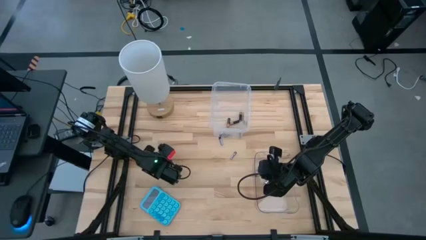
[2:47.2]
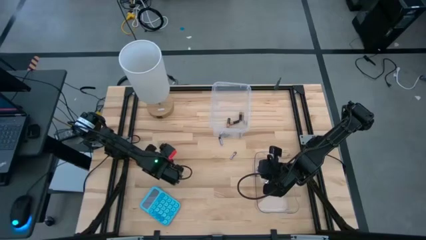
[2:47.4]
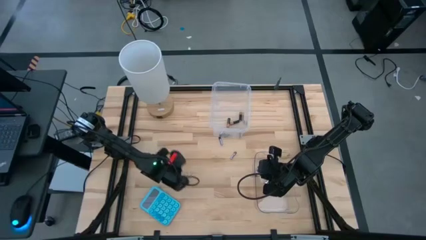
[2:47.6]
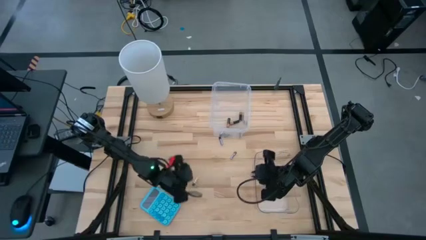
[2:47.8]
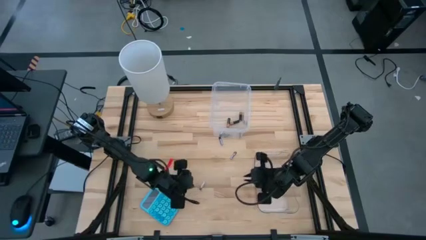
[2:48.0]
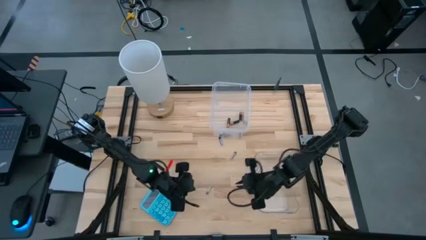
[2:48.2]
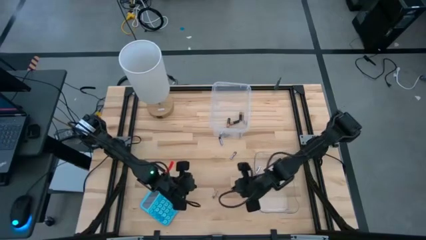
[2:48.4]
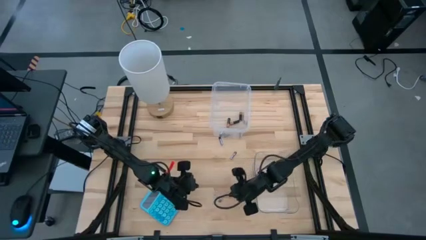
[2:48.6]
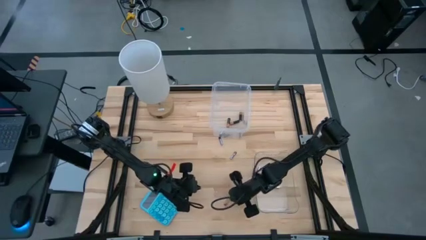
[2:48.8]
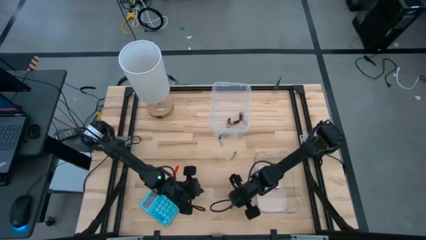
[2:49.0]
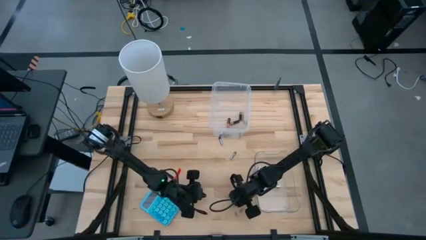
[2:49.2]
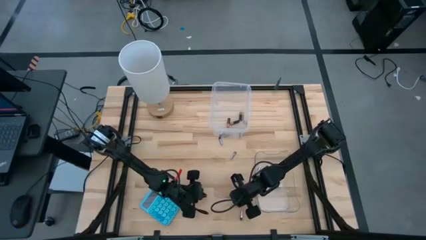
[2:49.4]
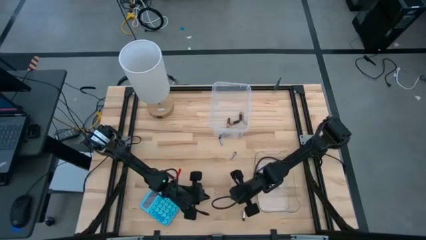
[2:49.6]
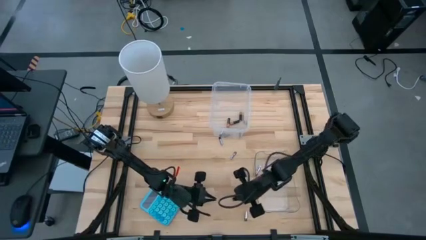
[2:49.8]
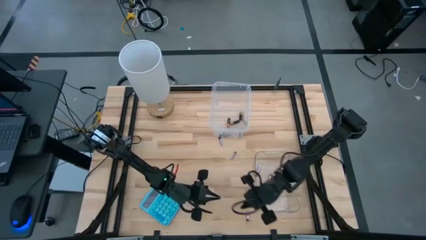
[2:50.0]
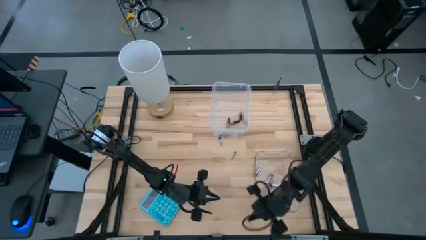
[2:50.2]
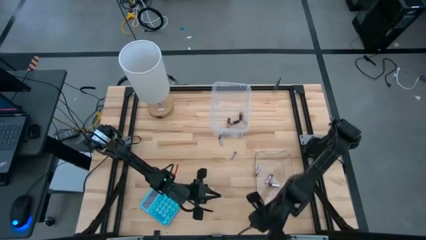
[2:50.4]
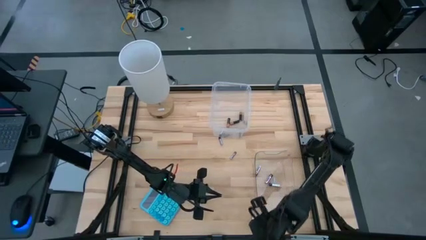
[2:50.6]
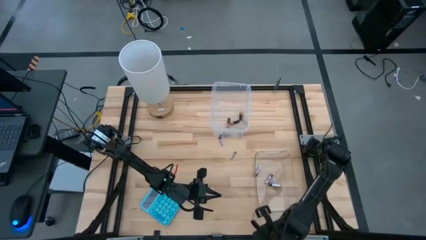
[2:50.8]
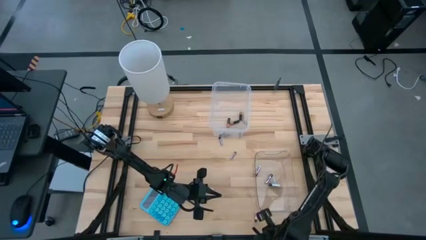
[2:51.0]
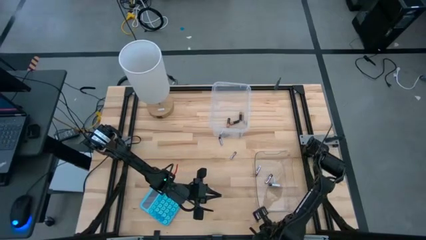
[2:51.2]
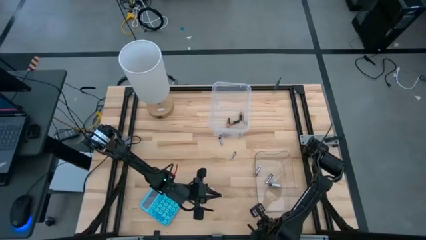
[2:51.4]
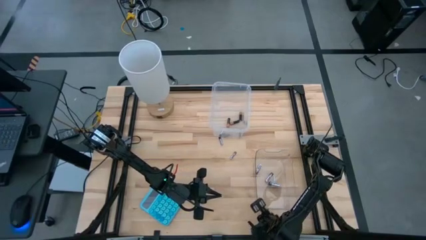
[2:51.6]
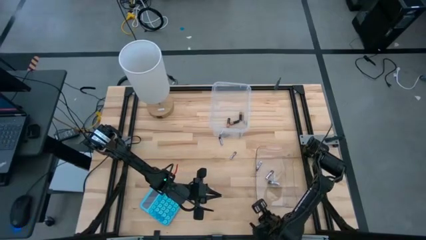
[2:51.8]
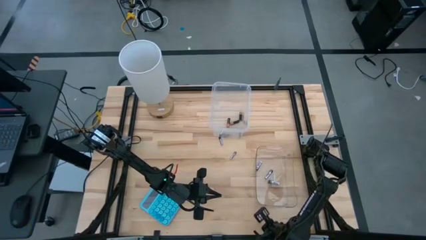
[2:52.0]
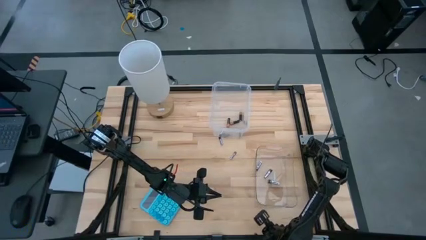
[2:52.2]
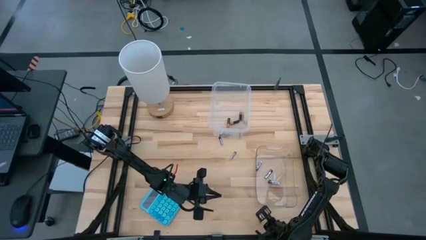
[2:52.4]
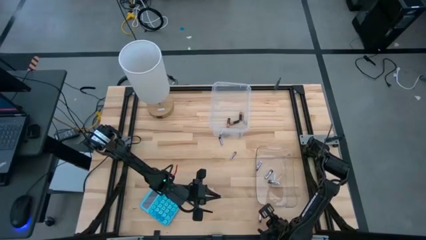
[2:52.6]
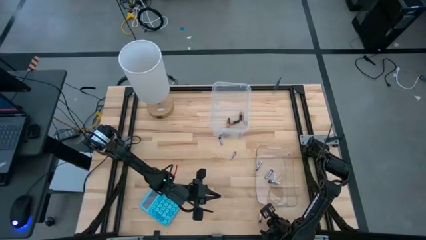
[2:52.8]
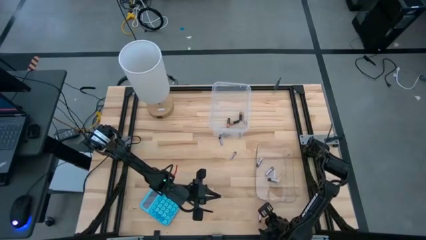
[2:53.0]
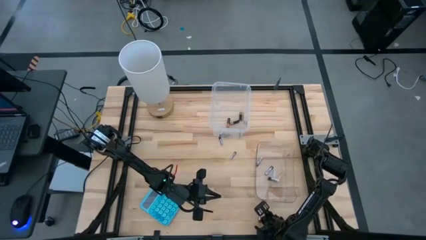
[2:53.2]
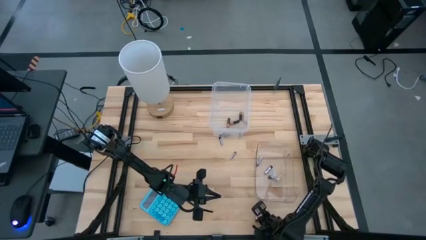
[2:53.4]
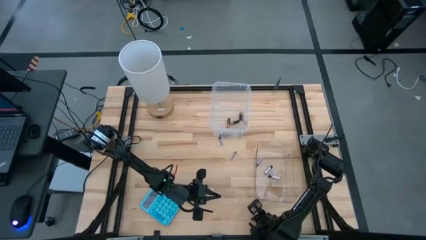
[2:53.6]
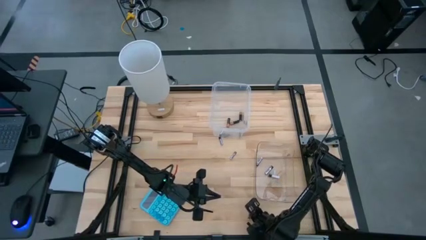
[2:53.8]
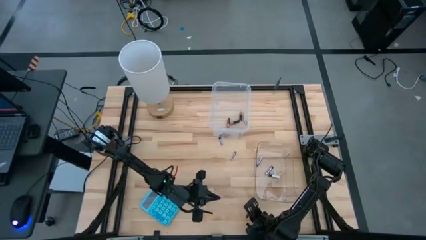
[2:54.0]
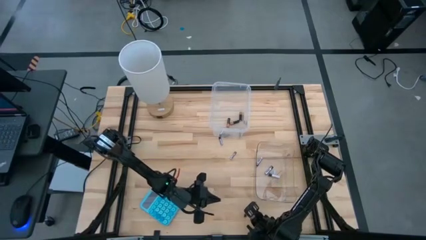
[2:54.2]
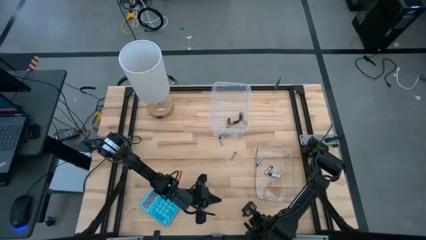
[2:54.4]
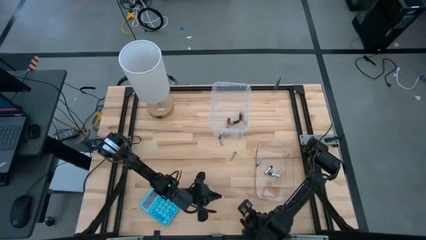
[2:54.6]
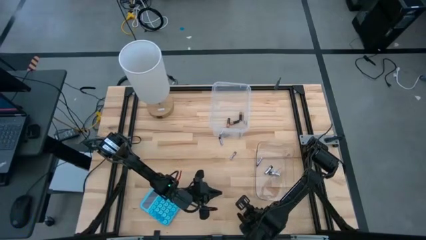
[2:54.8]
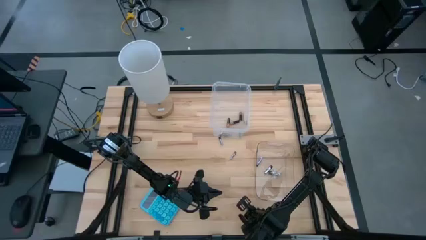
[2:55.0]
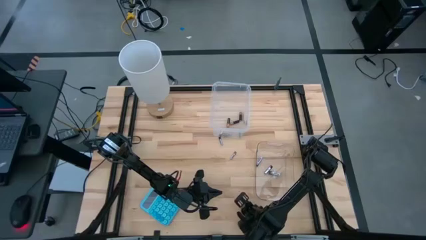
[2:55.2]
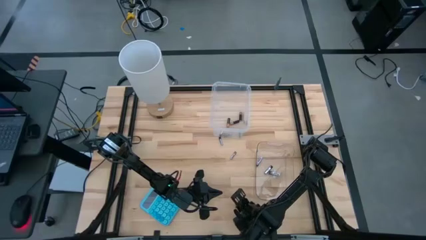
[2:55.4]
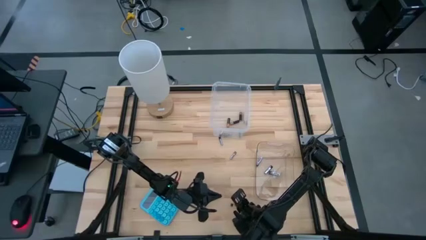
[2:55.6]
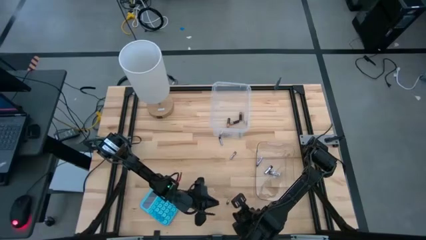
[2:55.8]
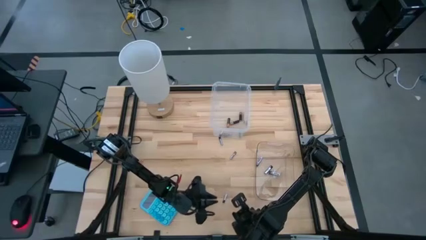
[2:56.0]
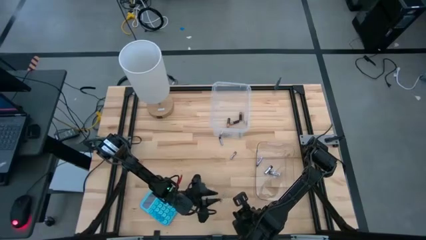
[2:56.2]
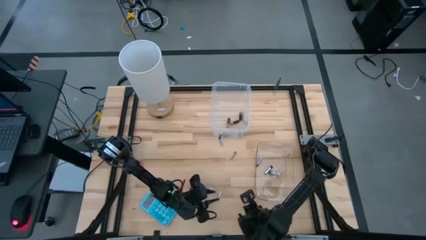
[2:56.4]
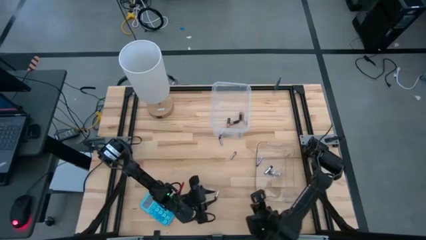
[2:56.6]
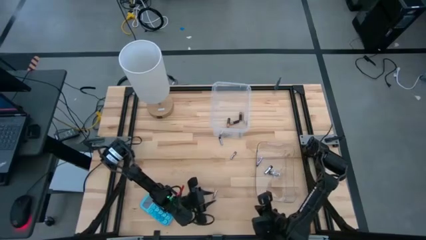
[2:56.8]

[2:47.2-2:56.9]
Task: Sort batteries
Put the silver battery into the bottom transparent bin

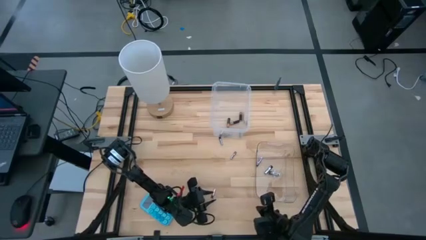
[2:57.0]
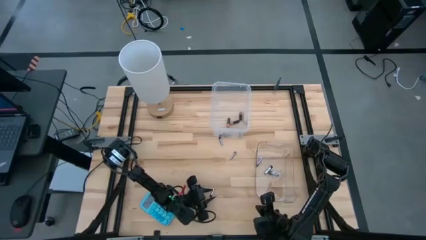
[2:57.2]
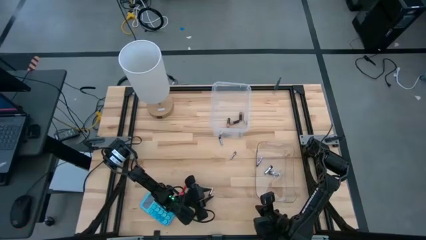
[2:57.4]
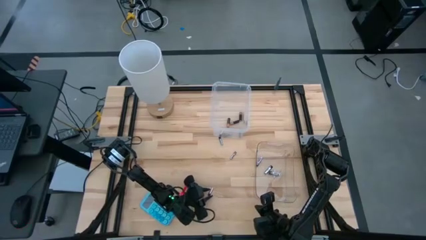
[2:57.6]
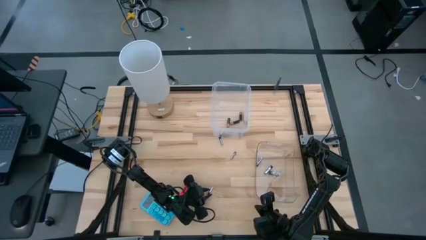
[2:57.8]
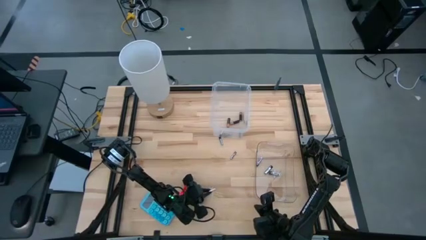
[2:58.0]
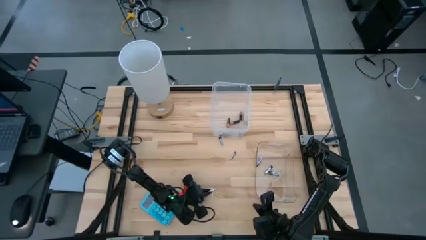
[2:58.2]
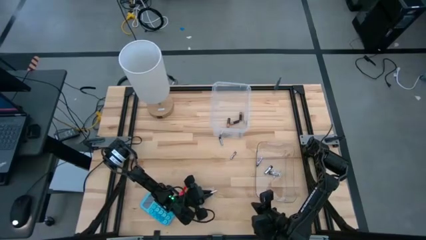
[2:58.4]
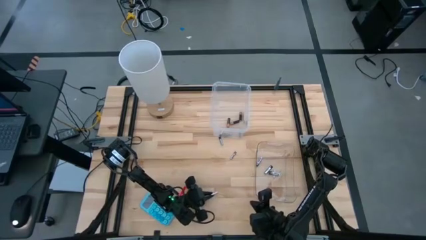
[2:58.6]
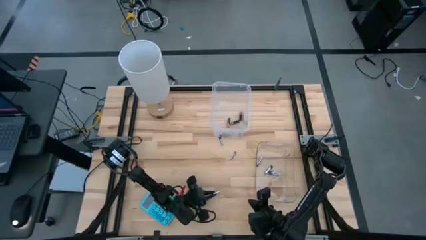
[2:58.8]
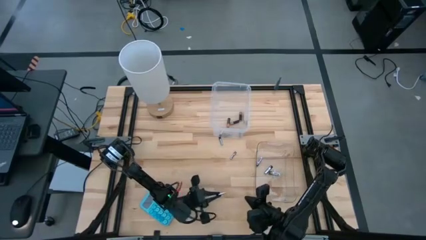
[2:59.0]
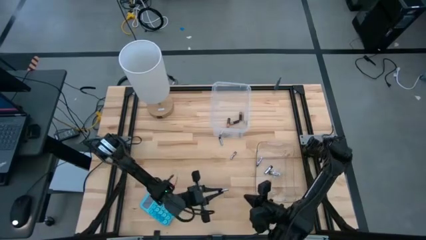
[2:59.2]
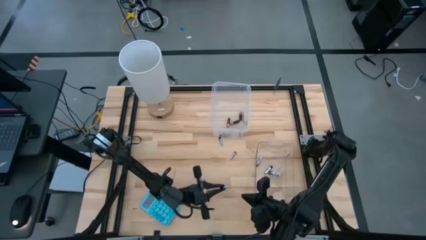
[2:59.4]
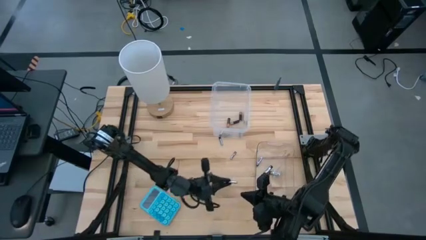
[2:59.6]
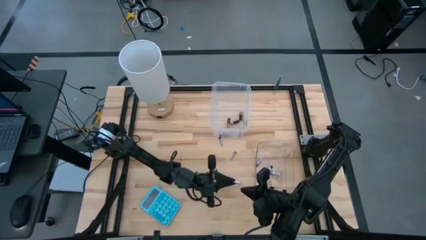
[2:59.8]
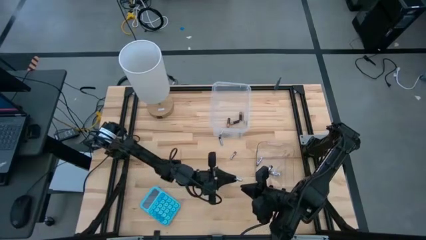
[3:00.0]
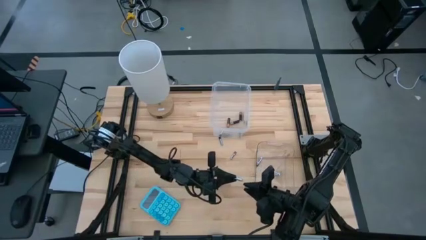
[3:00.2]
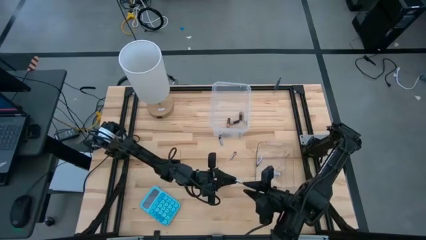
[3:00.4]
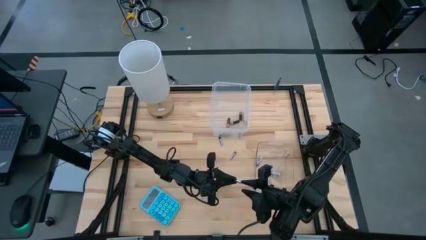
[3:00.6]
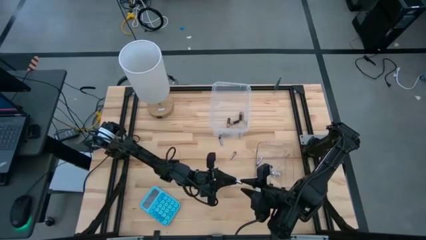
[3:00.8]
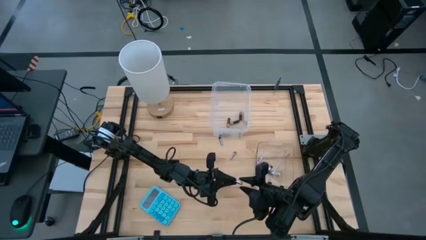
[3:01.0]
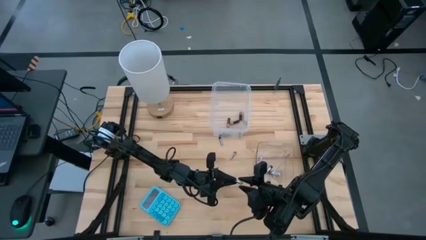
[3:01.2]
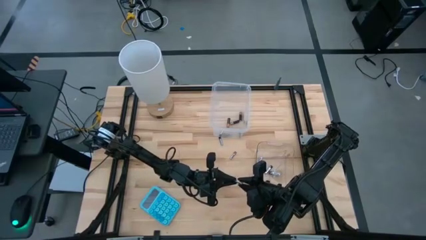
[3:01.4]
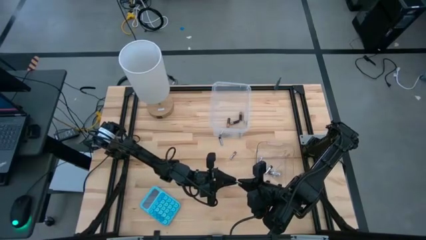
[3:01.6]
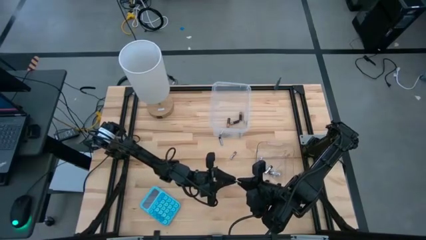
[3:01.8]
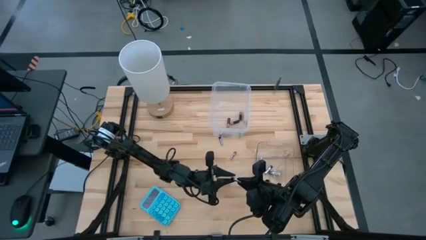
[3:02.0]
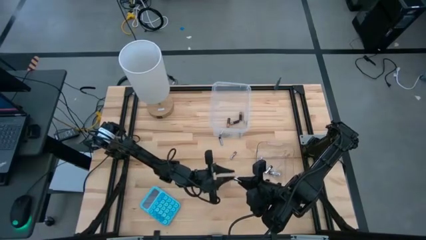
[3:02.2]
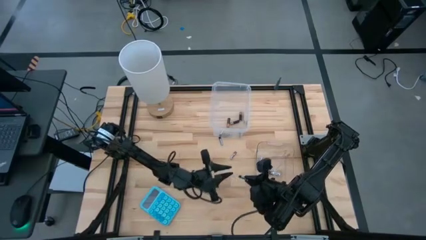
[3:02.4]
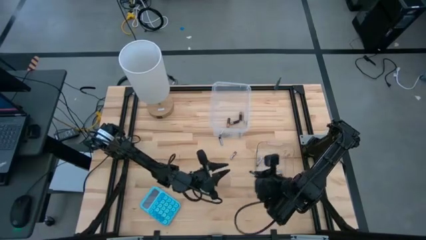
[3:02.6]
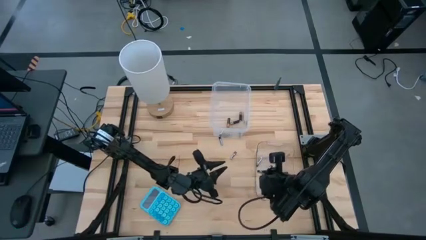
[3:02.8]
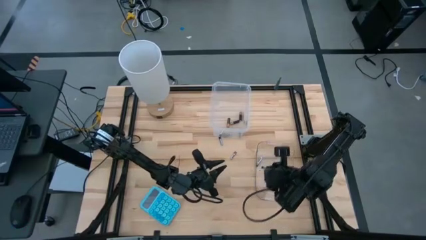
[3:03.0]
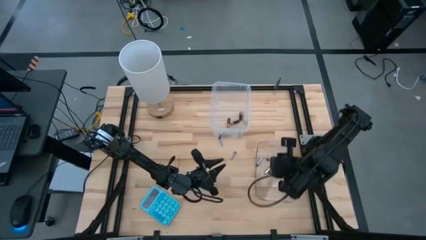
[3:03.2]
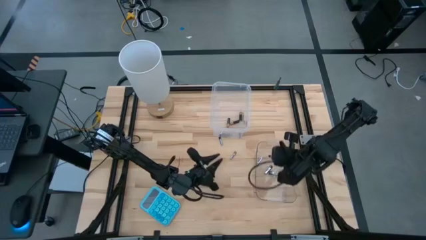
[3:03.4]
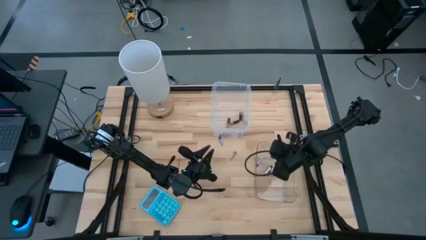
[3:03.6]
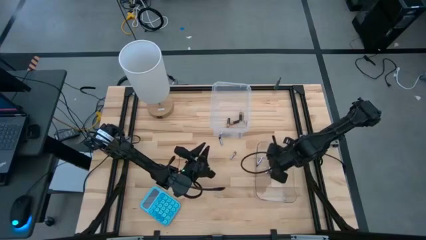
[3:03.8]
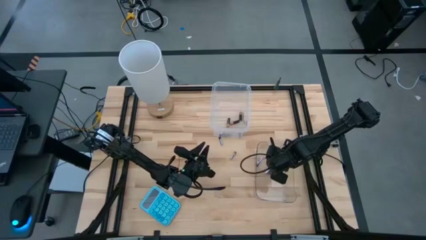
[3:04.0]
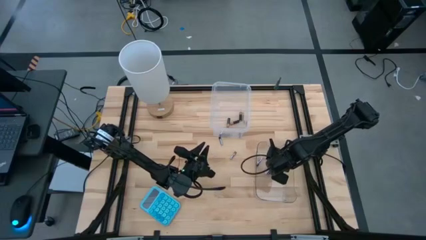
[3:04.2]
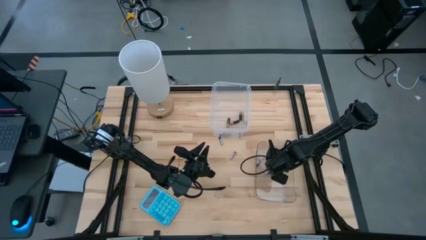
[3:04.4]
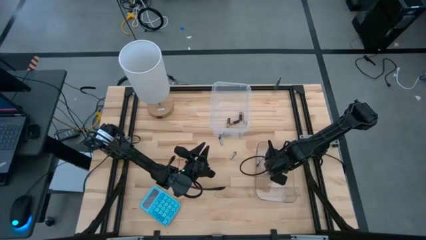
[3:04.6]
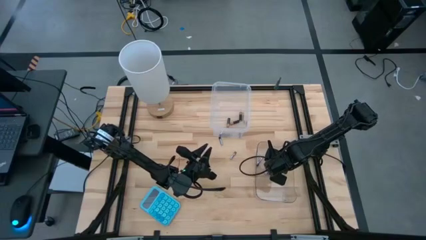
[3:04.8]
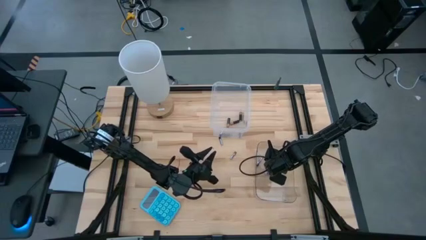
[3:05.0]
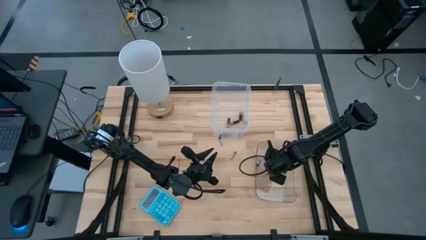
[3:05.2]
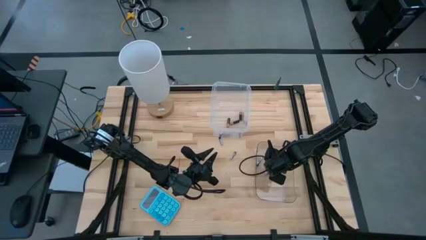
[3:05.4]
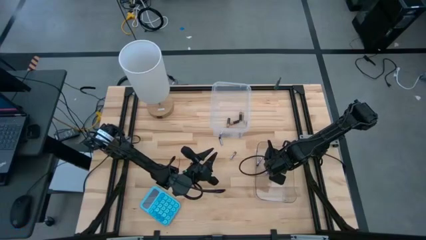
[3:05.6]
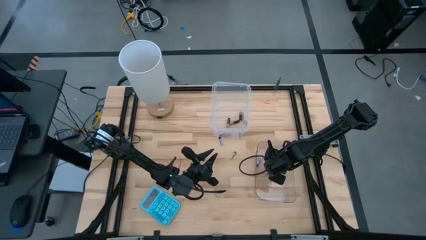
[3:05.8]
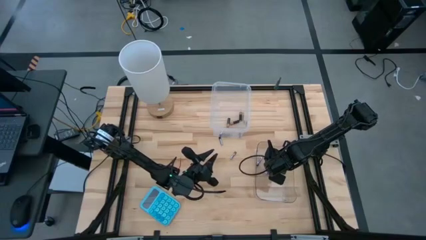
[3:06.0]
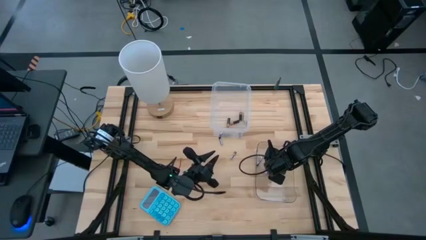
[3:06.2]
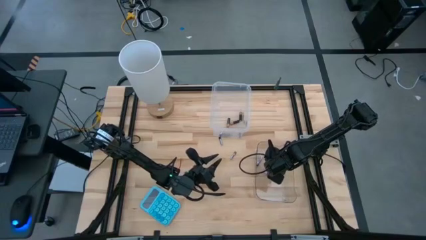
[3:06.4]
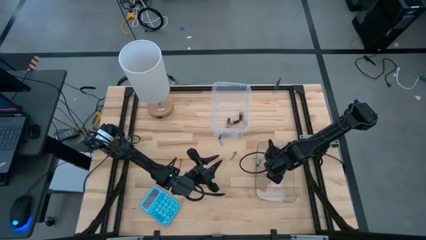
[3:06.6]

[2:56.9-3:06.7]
Put the silver battery into the bottom transparent bin
